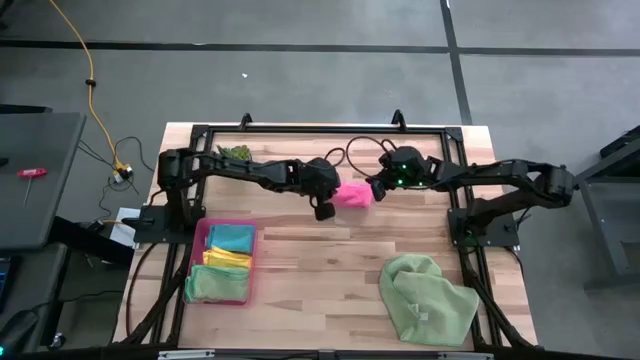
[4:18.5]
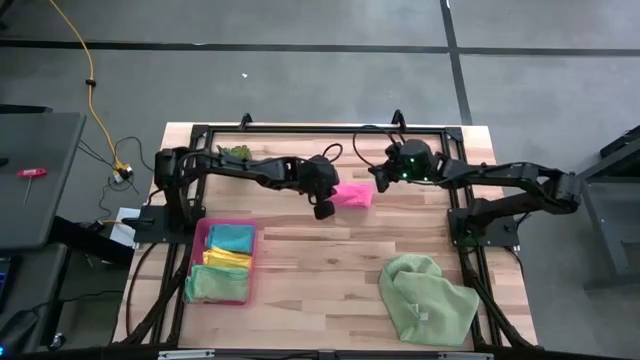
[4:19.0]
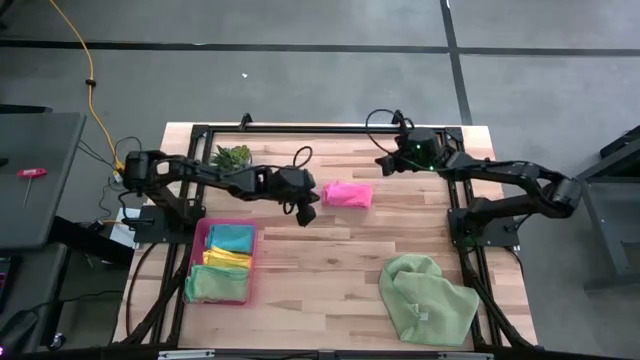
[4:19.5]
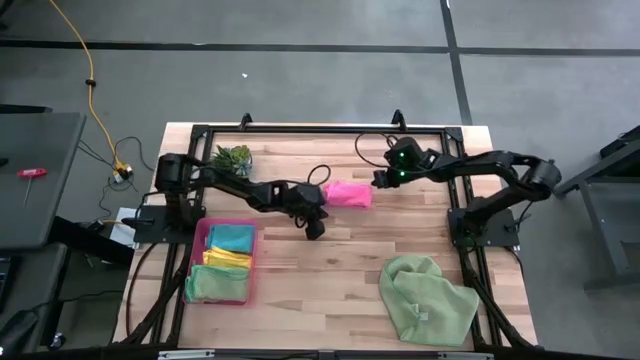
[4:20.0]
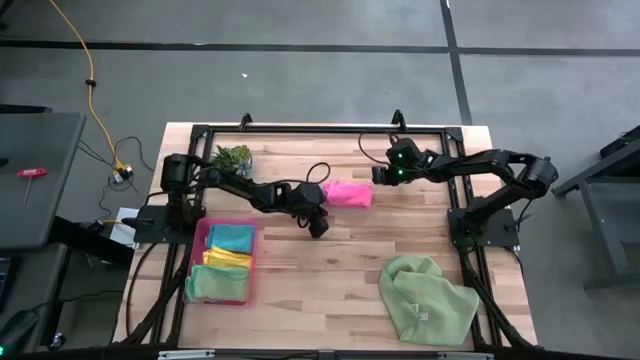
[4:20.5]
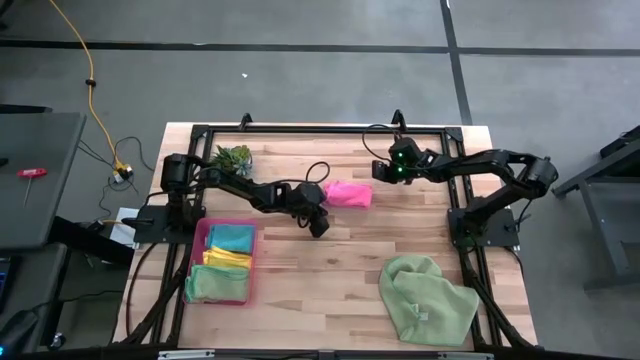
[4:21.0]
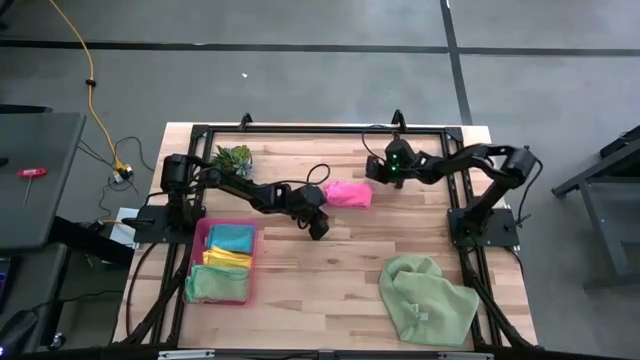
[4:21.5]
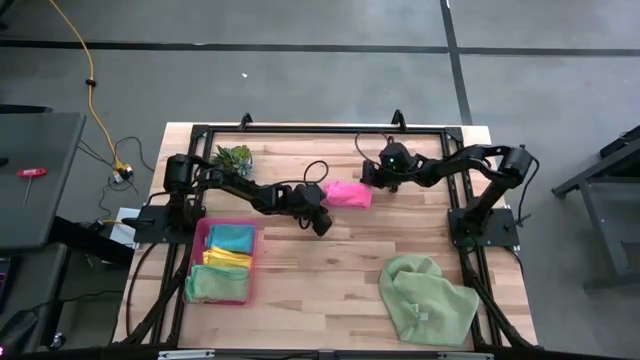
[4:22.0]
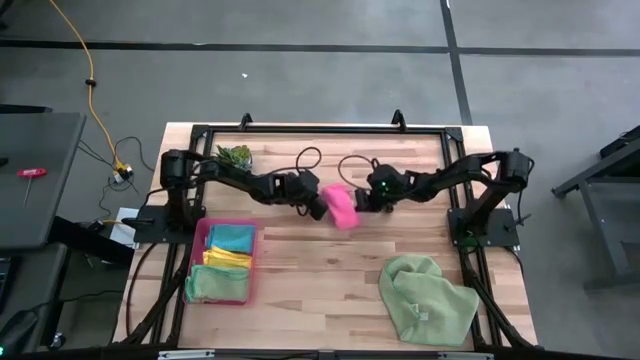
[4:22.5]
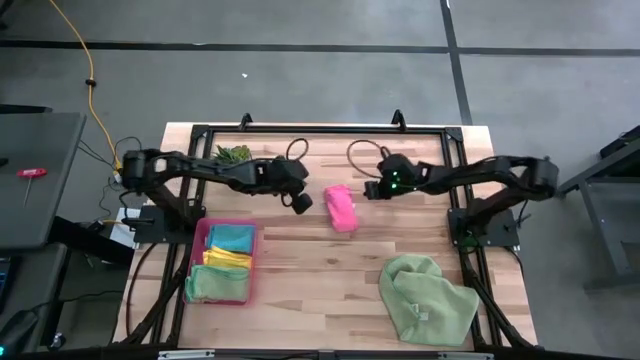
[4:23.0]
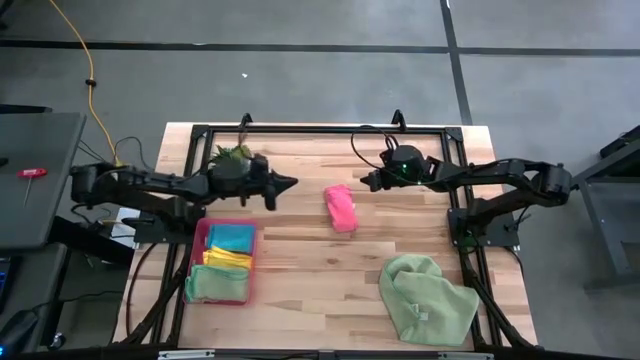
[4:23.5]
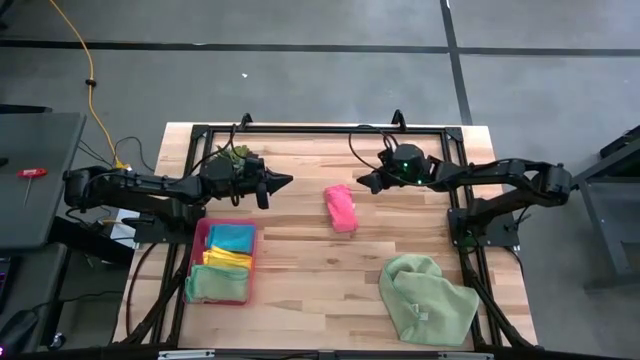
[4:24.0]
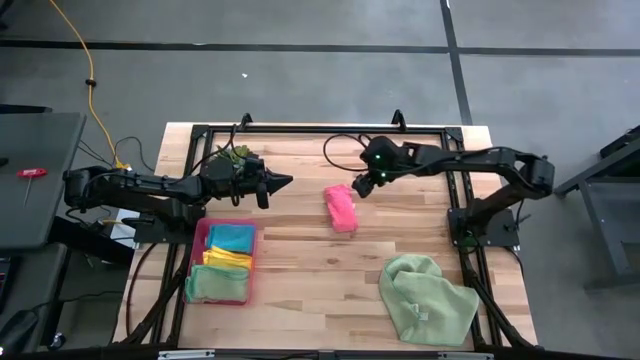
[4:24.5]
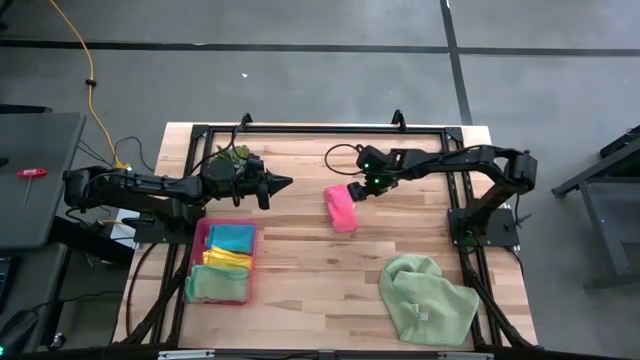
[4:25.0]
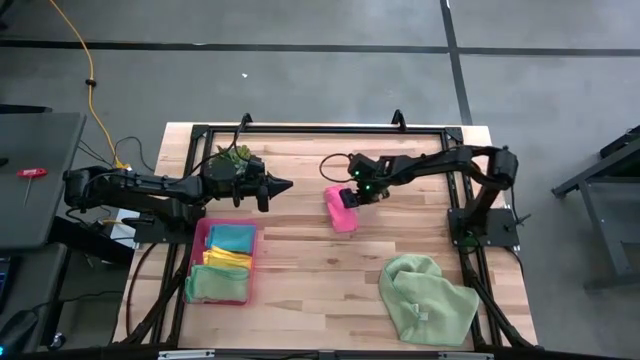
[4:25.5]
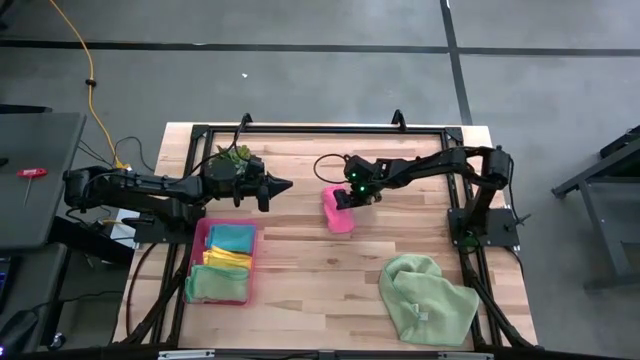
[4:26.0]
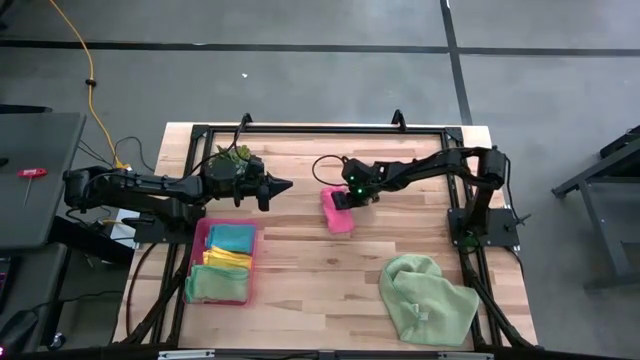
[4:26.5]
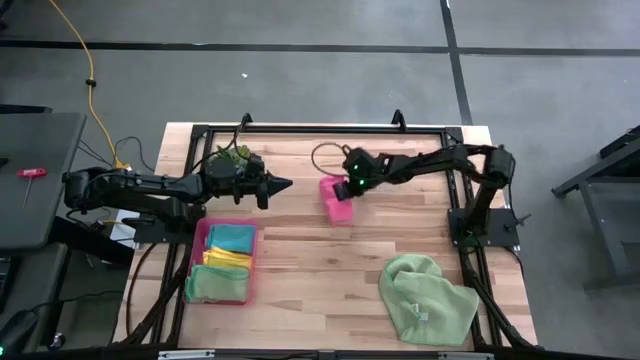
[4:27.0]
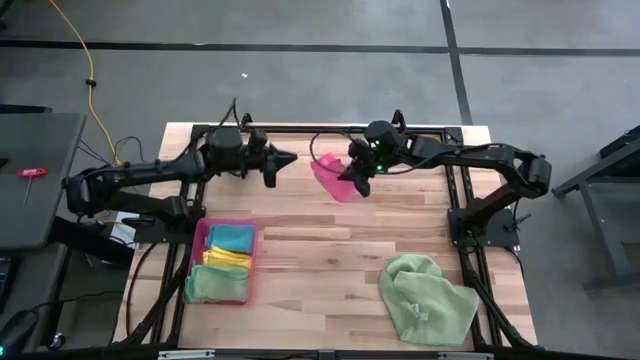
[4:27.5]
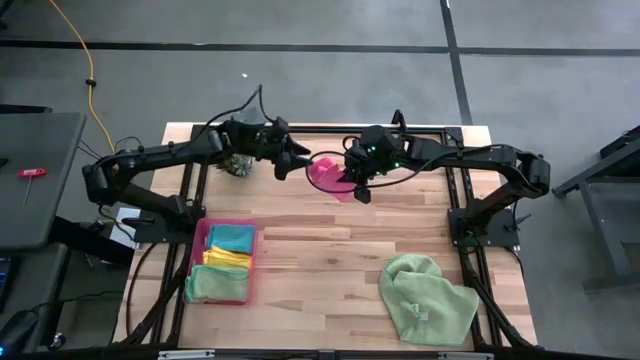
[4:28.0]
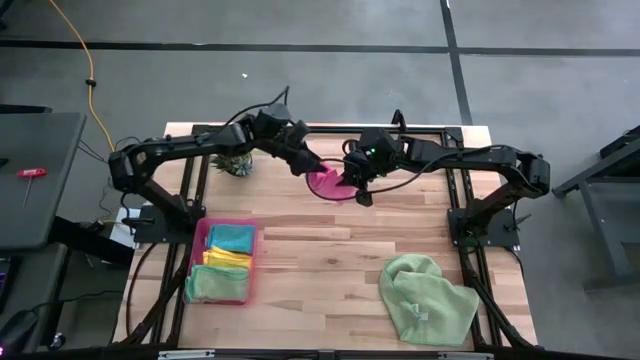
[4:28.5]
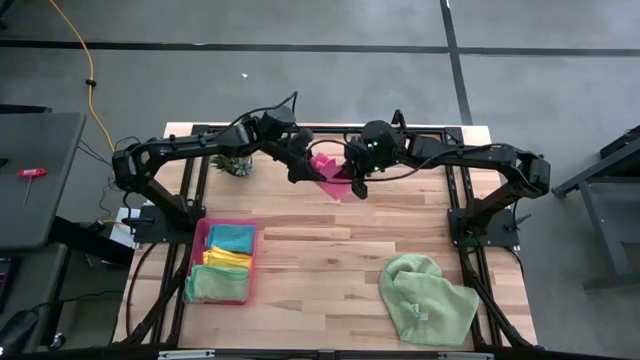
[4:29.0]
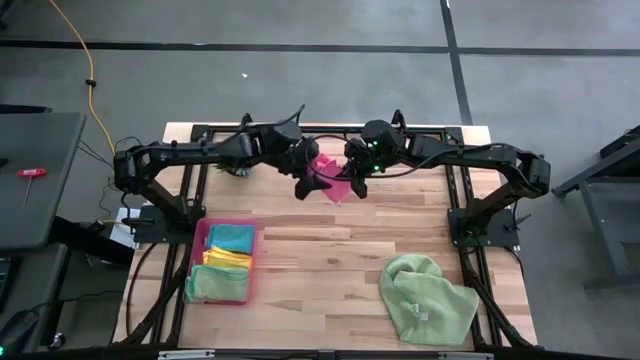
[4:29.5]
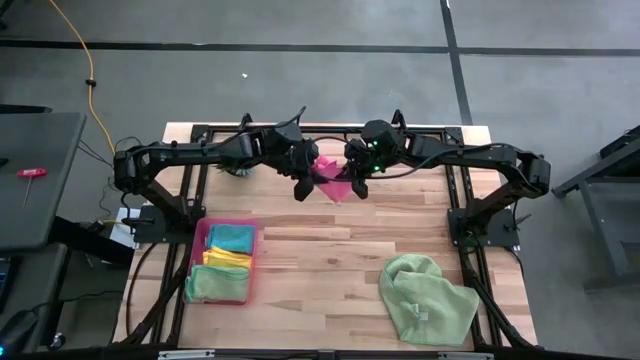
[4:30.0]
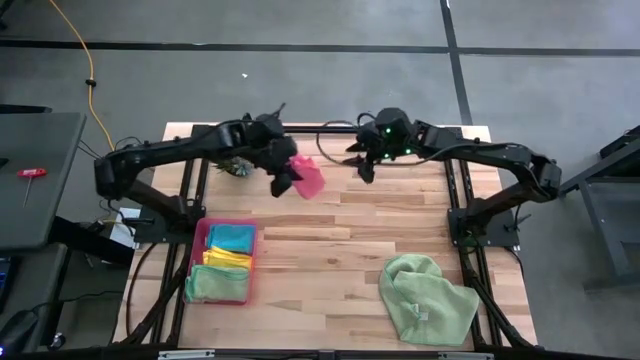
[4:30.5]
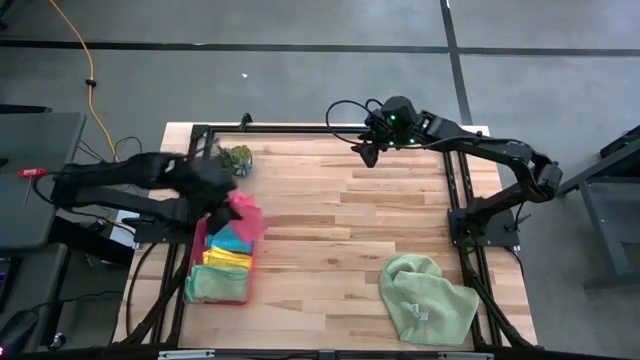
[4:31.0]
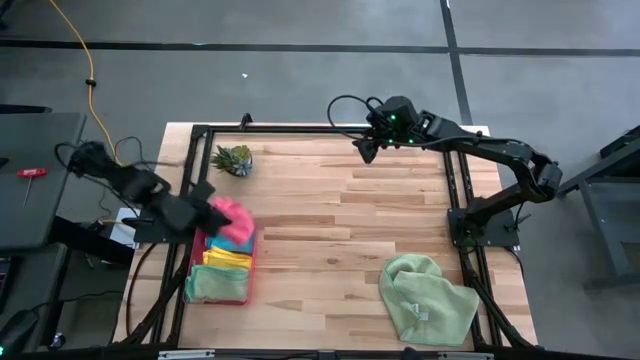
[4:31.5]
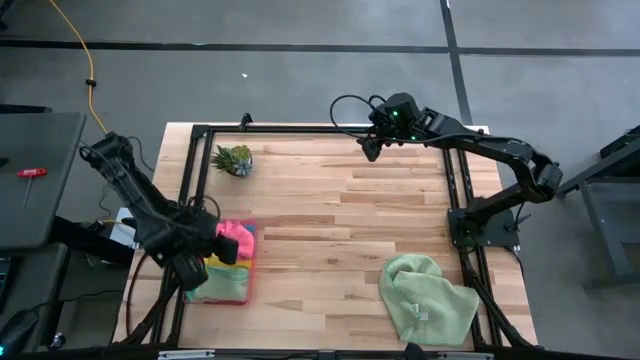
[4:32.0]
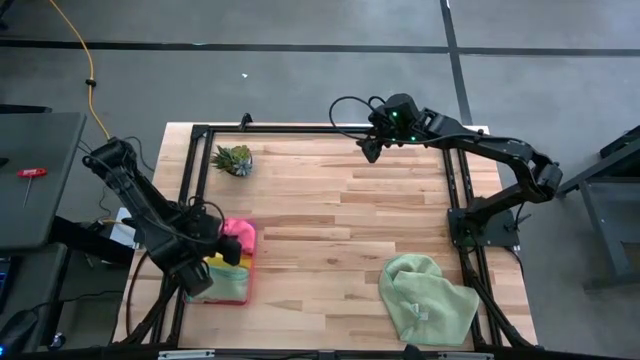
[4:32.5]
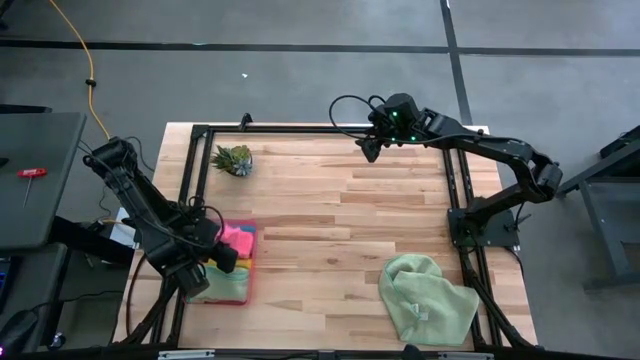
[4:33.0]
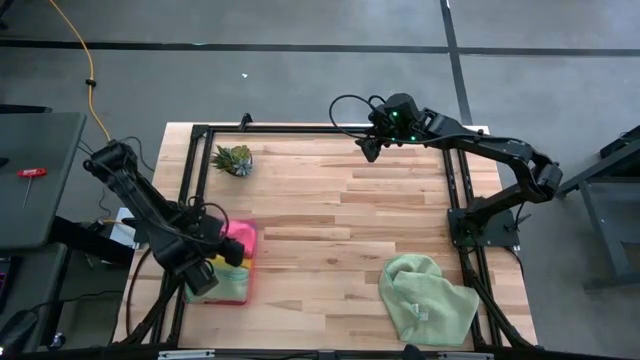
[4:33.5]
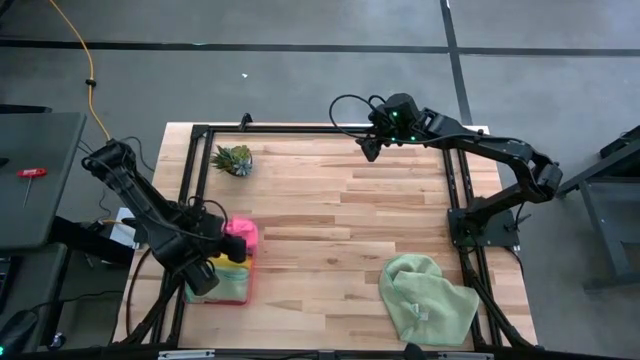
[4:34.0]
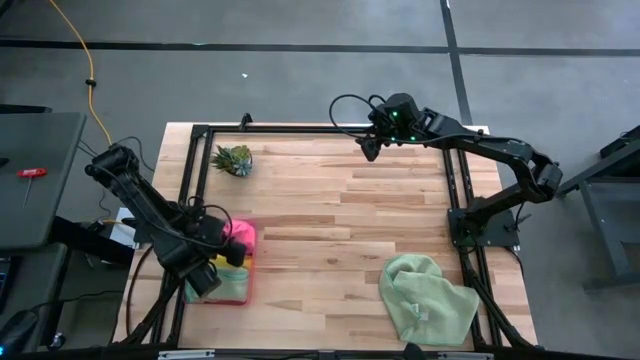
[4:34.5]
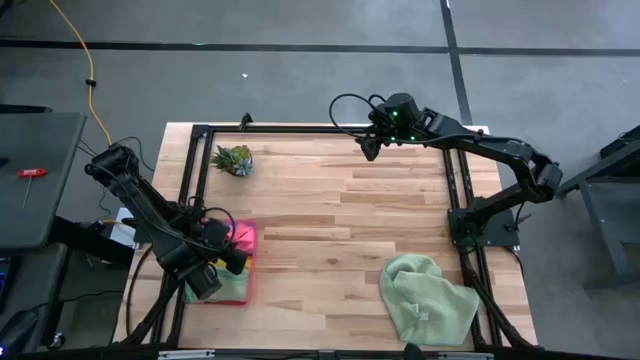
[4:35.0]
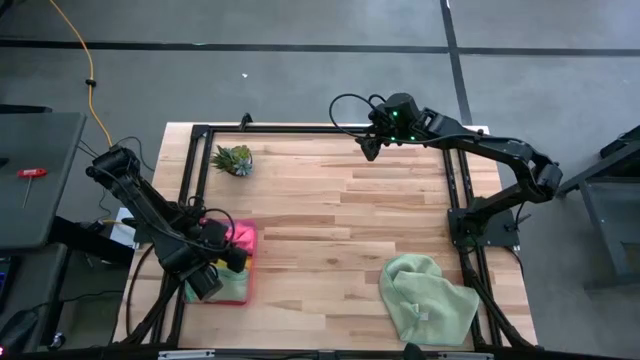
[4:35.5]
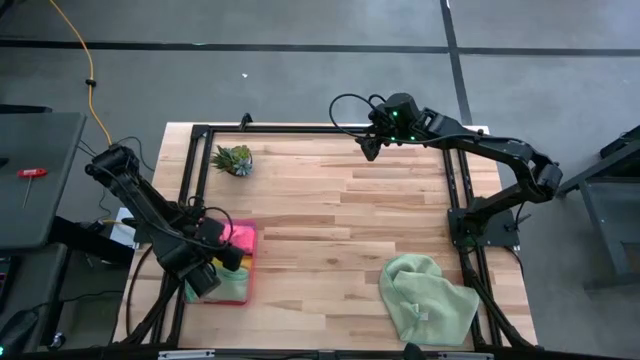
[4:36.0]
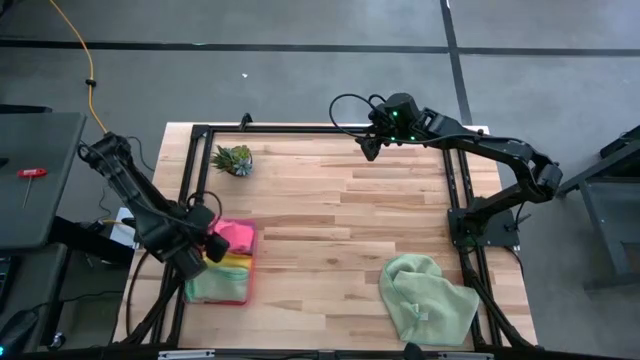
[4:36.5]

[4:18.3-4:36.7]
Task: Fold microfiber towels
Put the pink microfiber towel into the red bin
